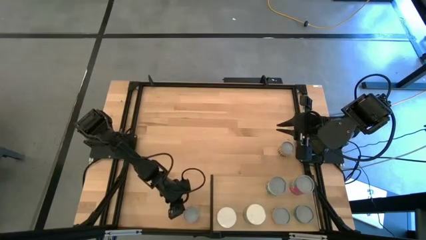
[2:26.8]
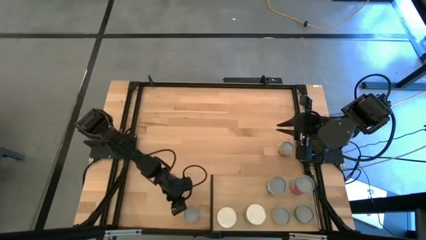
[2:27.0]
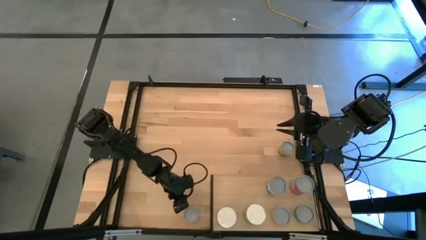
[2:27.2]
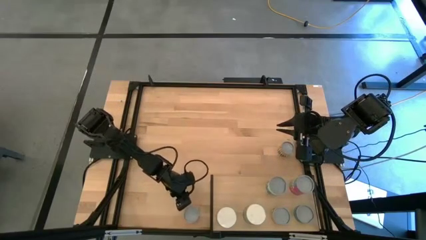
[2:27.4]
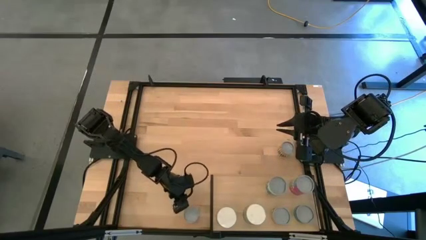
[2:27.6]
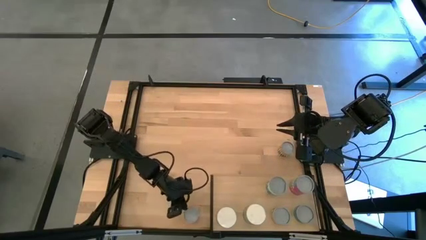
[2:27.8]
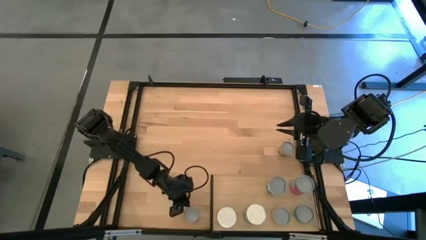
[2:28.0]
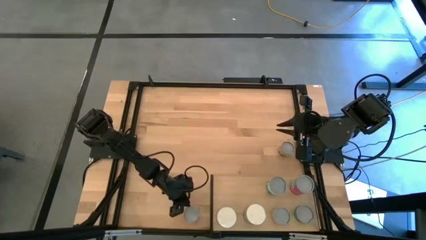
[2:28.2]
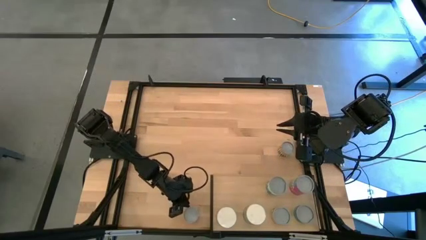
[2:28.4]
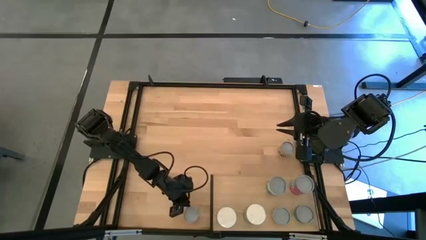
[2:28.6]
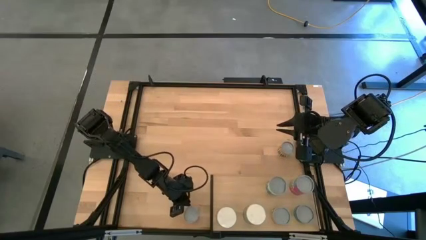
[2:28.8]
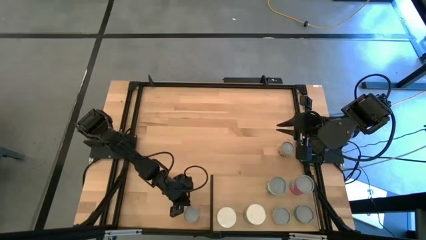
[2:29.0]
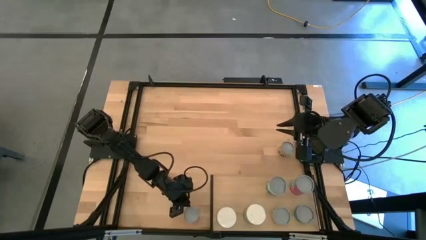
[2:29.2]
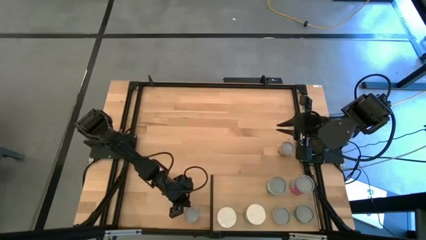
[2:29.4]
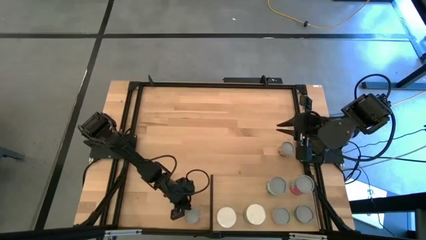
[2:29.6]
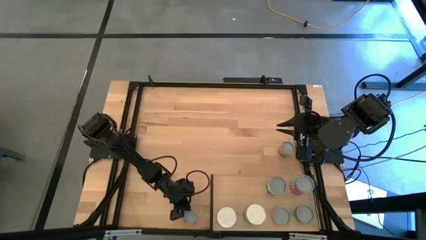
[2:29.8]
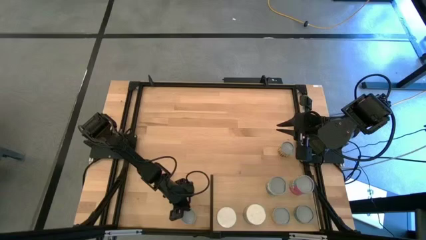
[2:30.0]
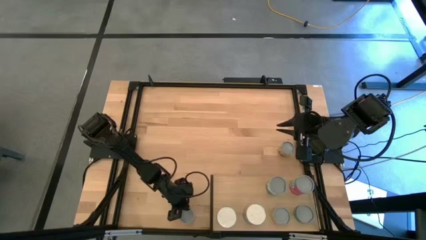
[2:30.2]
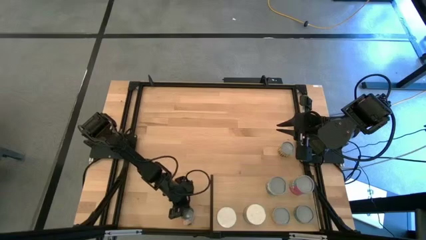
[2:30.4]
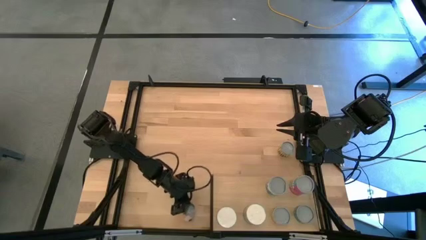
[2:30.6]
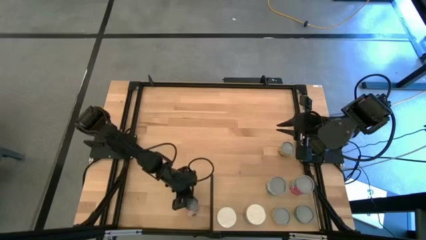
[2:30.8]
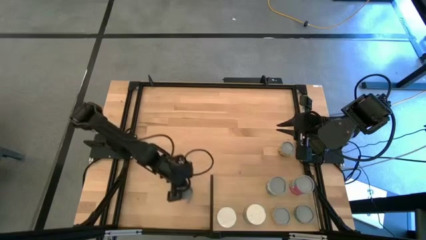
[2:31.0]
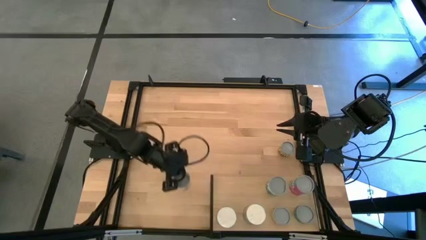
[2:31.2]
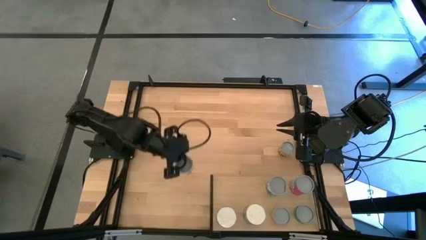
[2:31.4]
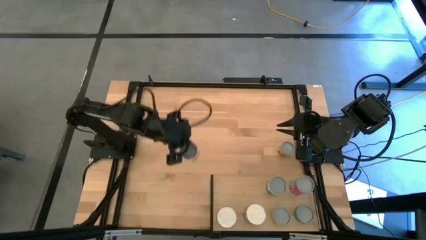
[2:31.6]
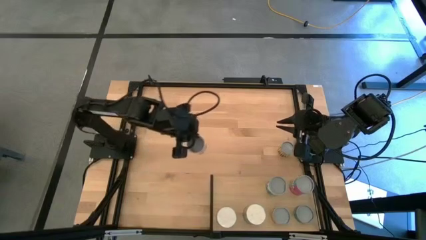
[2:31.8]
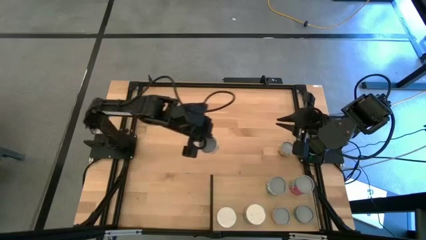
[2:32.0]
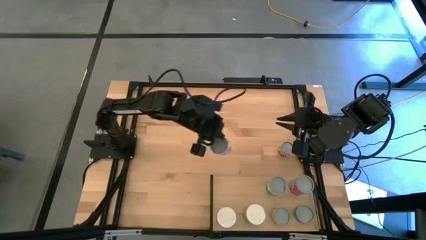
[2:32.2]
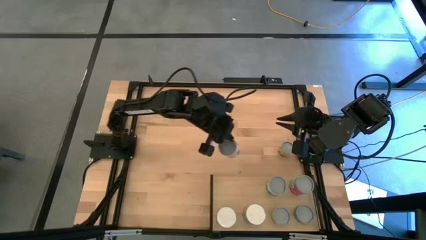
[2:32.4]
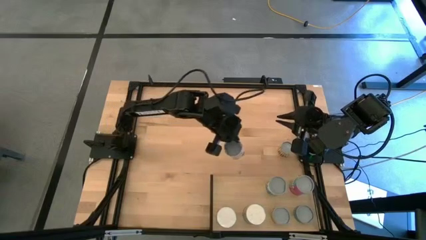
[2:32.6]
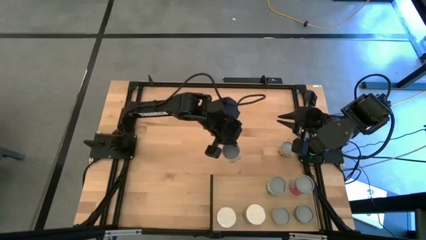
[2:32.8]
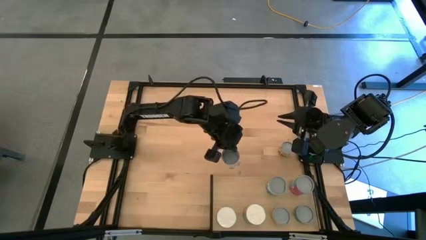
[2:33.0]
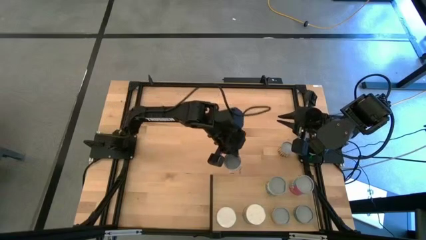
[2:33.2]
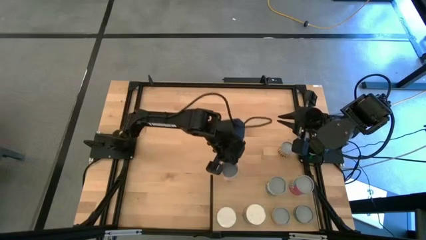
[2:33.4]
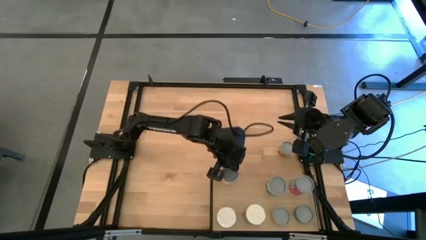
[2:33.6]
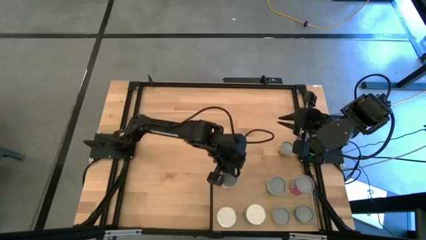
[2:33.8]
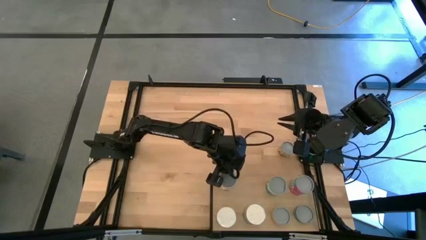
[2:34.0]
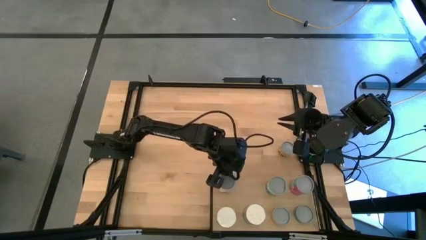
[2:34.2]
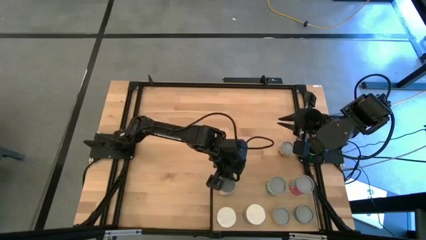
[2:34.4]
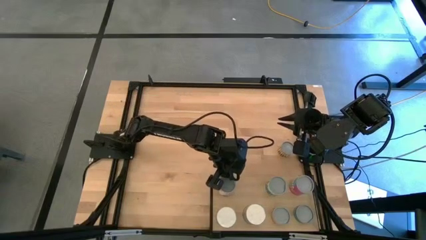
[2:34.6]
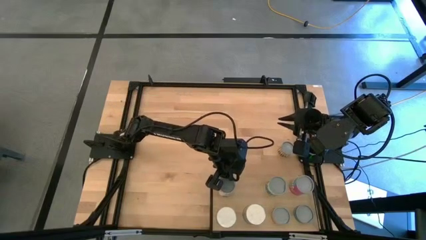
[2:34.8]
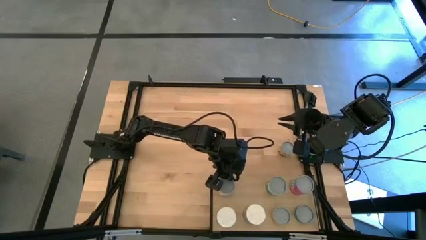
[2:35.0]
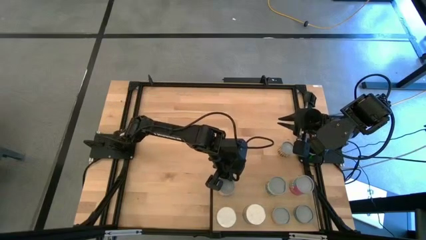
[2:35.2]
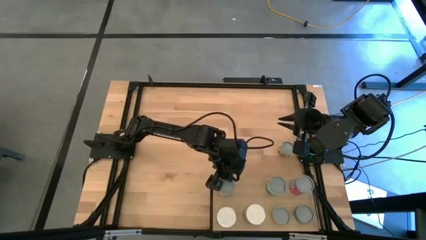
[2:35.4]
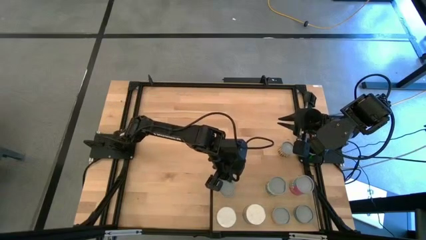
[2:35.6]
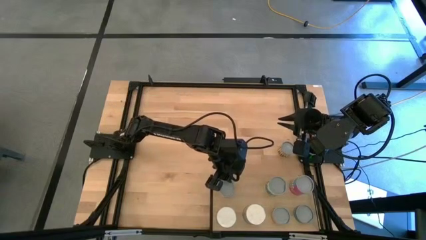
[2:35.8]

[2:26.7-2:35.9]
Task: Pick and place cans onto a shelf
Put the canned meatballs on the shelf

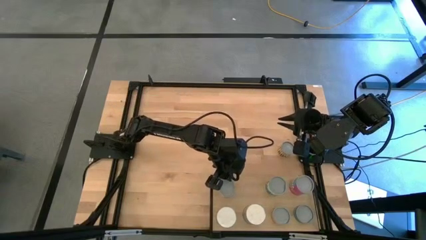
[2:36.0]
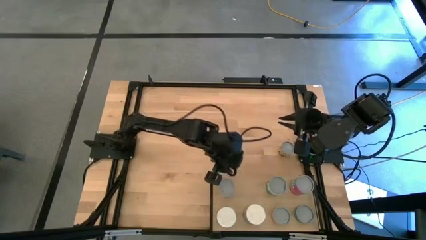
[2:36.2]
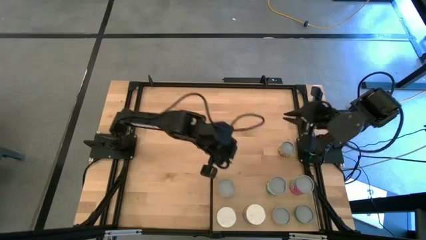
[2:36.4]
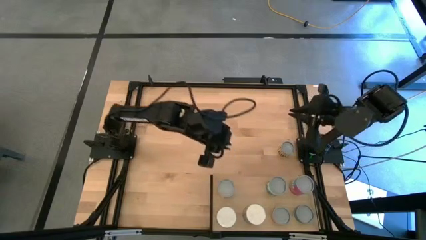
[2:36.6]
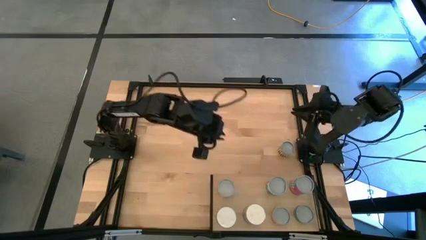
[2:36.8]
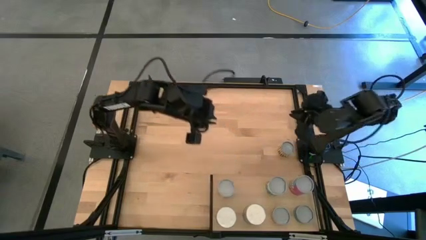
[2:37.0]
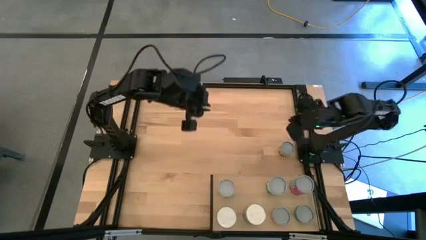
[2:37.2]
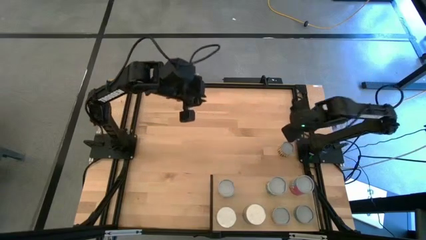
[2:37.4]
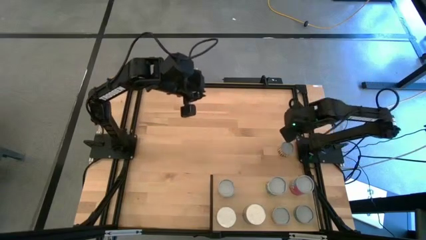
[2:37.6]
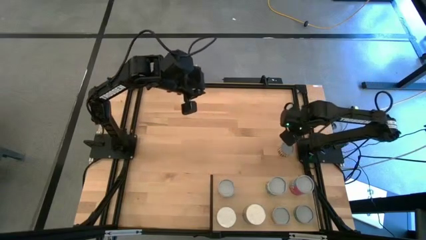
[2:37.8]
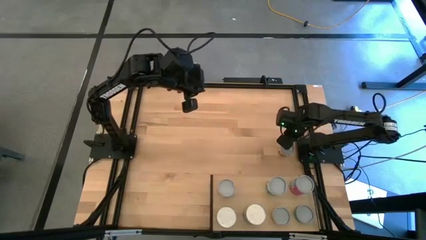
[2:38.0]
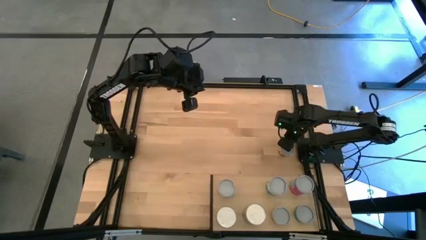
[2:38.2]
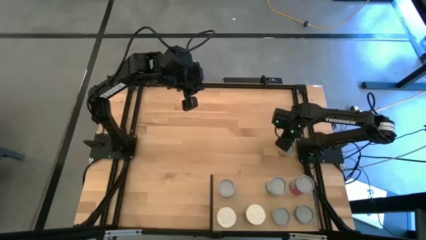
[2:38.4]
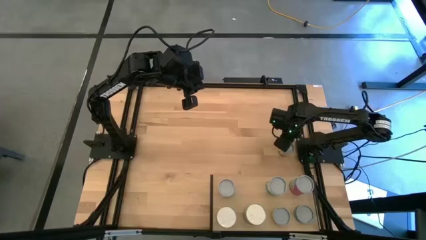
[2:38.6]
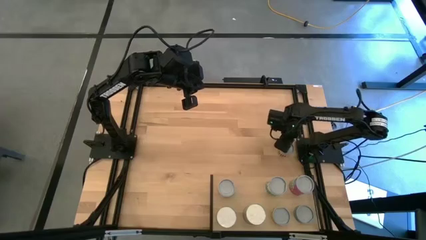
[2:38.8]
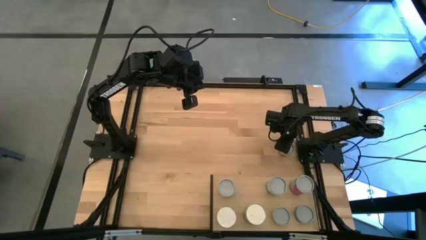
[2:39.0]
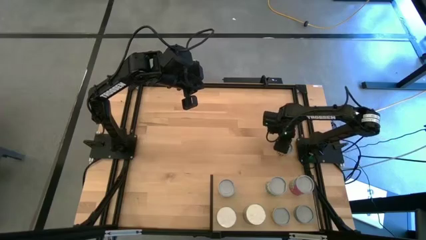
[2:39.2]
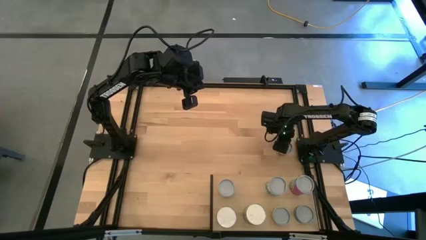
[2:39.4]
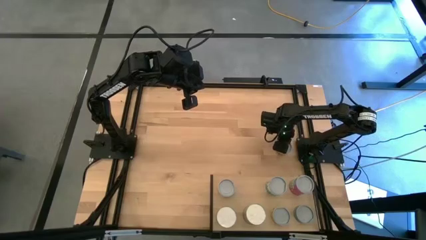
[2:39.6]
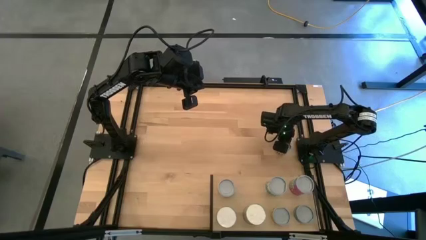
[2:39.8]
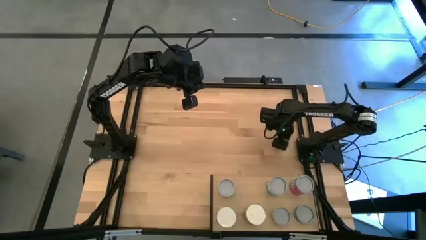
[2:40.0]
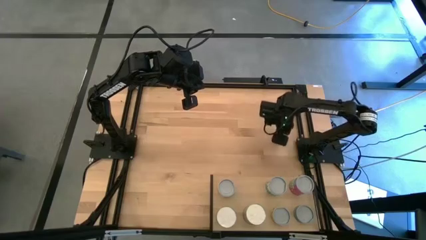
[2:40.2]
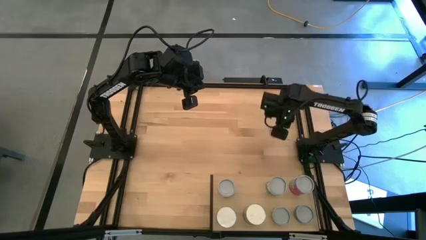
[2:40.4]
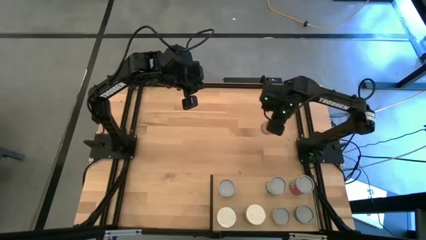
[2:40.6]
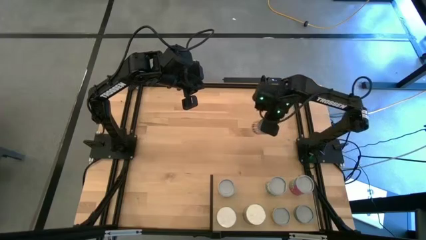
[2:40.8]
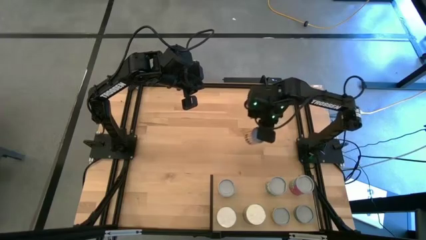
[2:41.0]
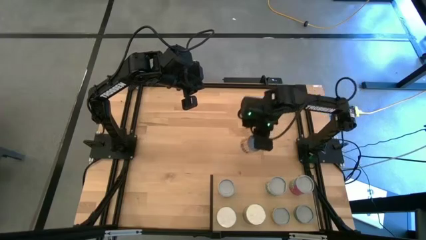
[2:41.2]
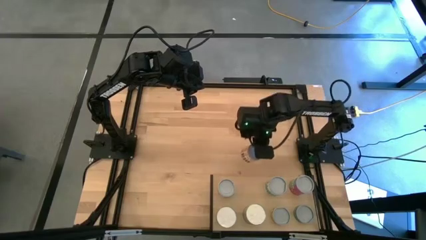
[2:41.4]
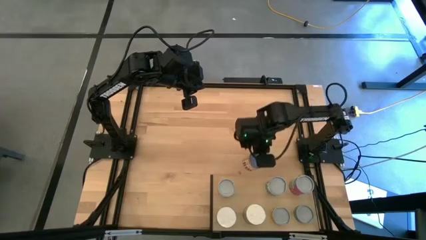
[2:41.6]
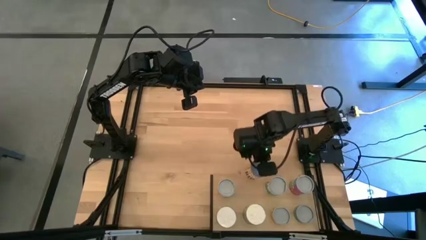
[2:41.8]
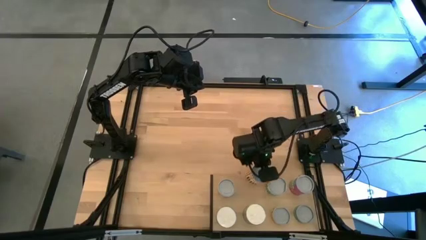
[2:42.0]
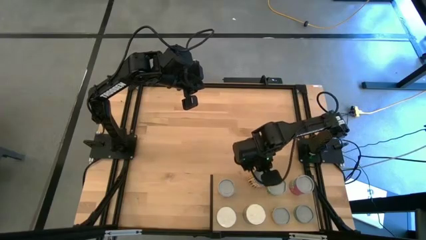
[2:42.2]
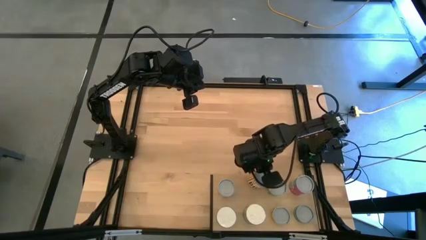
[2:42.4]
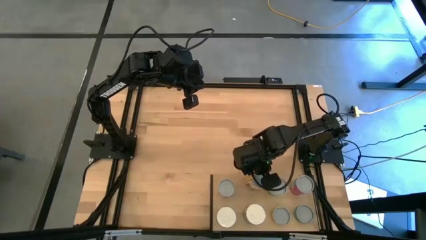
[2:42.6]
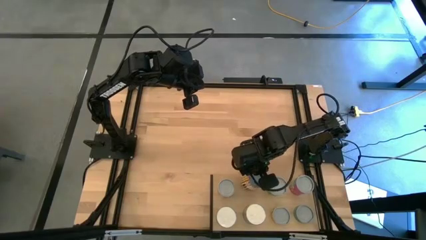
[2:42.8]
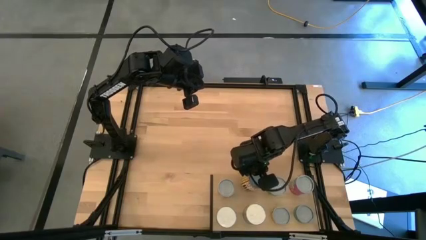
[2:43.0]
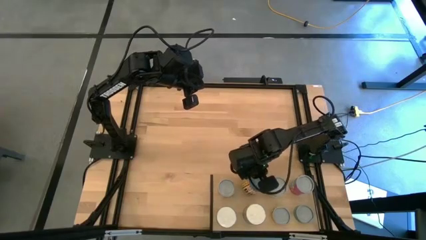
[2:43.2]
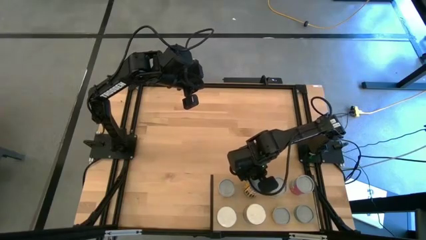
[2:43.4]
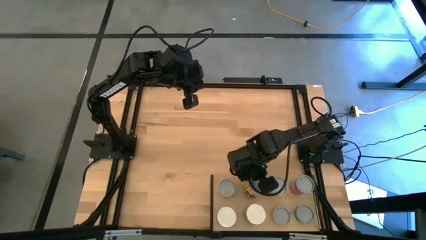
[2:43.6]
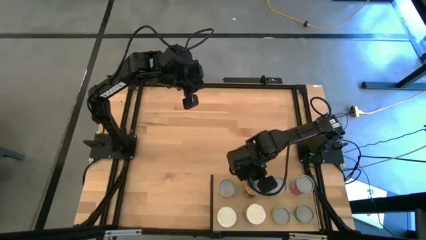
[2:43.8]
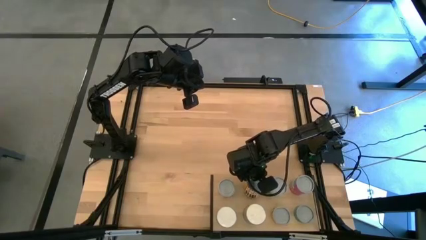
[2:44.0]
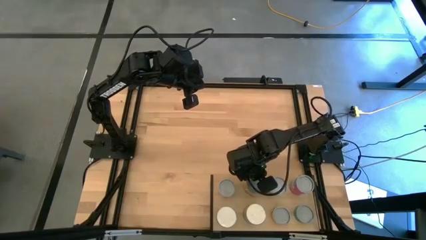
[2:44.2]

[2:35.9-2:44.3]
Put the canned beans on the shelf
